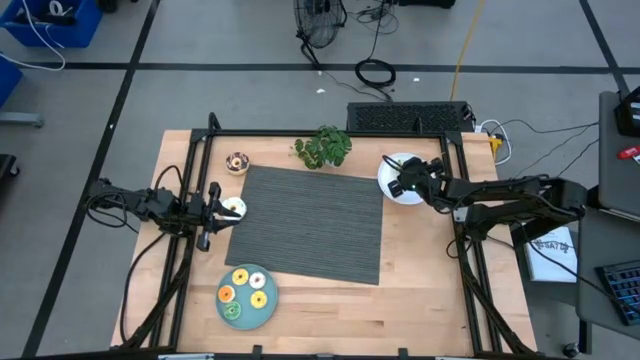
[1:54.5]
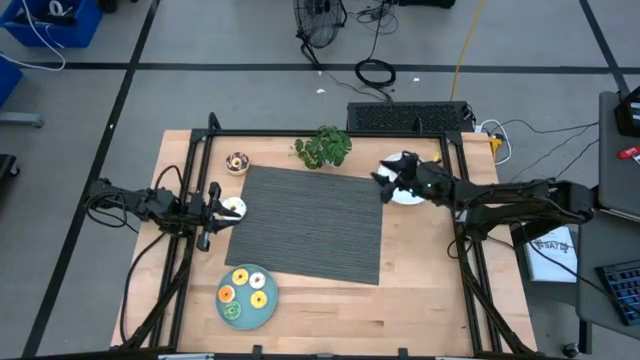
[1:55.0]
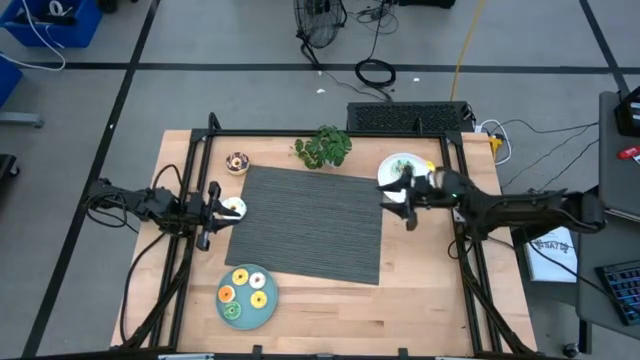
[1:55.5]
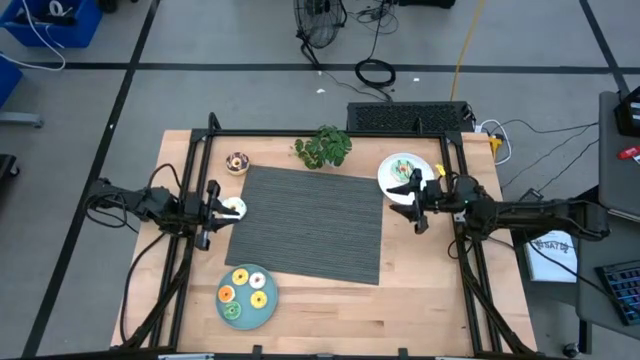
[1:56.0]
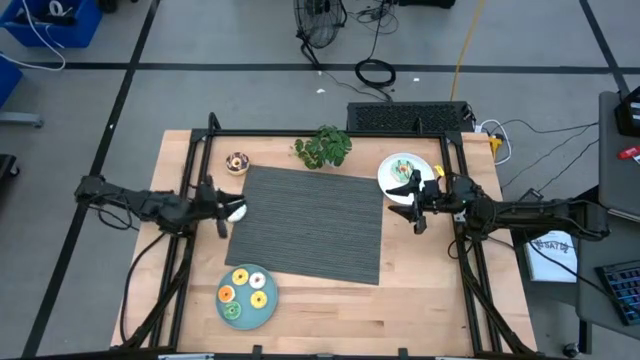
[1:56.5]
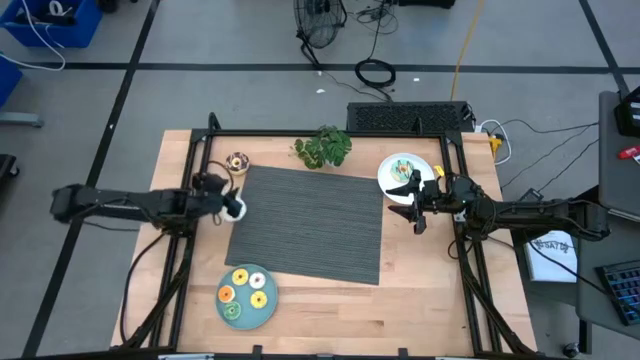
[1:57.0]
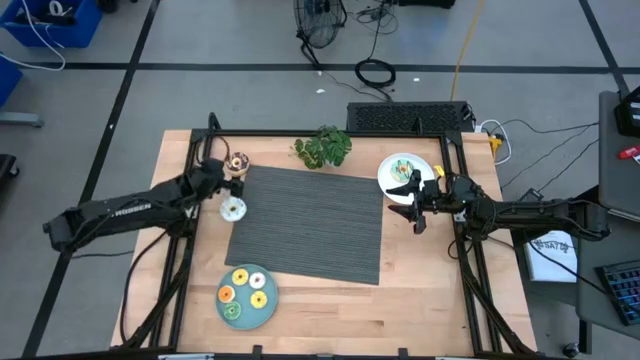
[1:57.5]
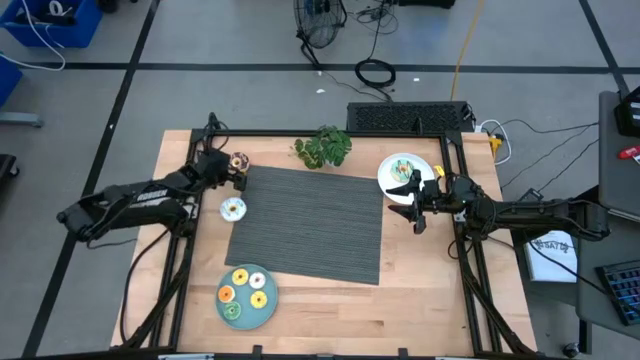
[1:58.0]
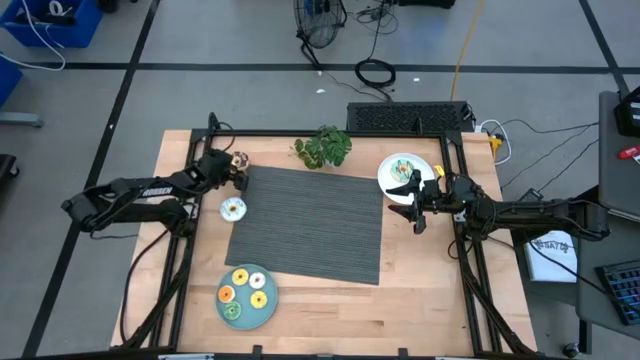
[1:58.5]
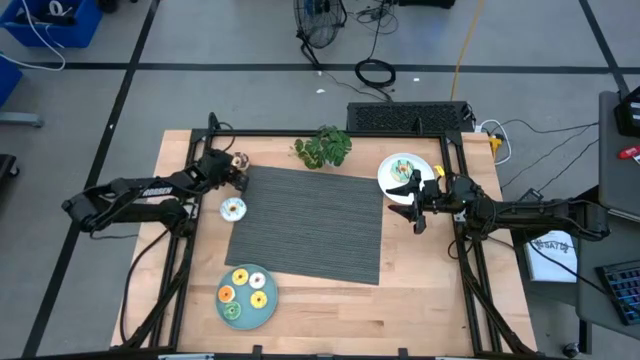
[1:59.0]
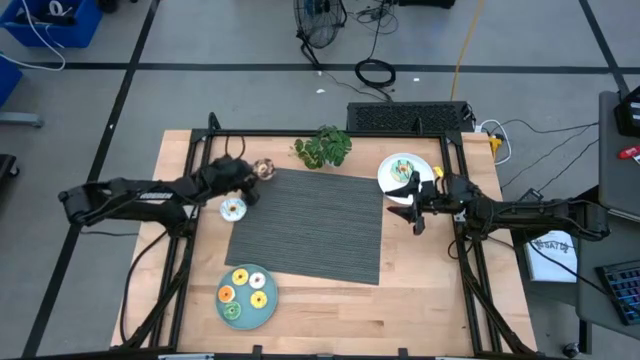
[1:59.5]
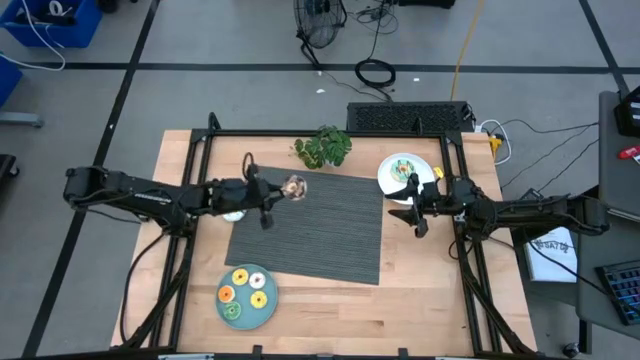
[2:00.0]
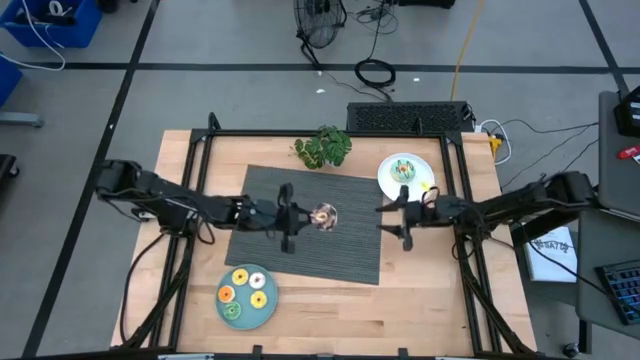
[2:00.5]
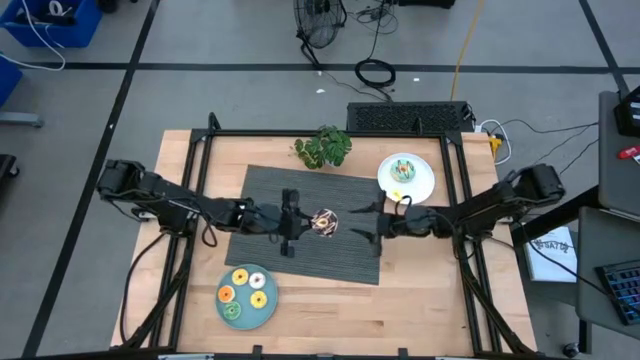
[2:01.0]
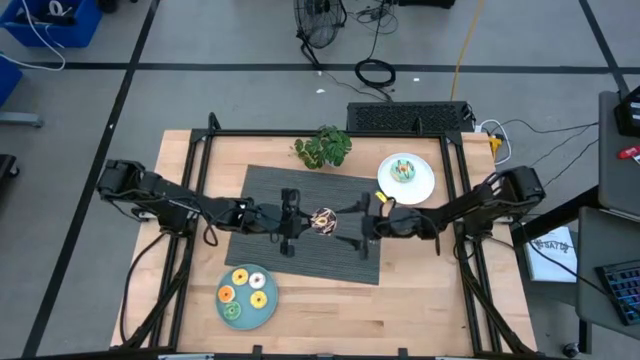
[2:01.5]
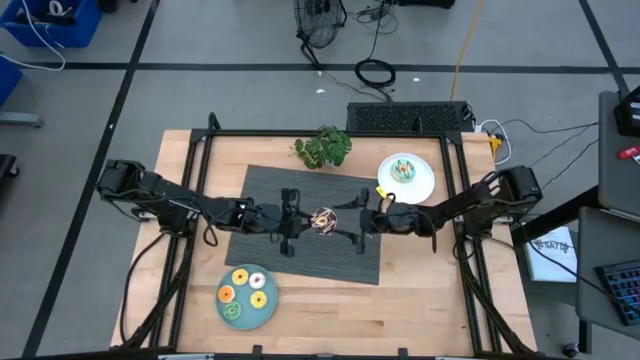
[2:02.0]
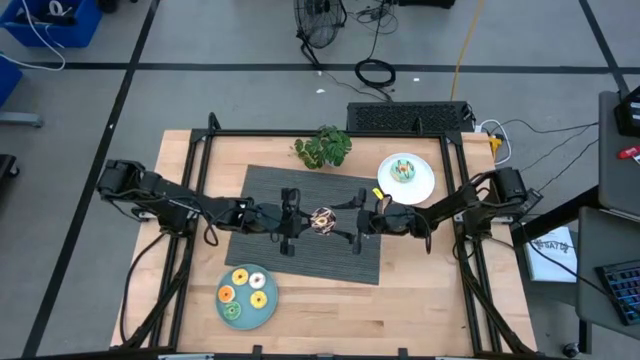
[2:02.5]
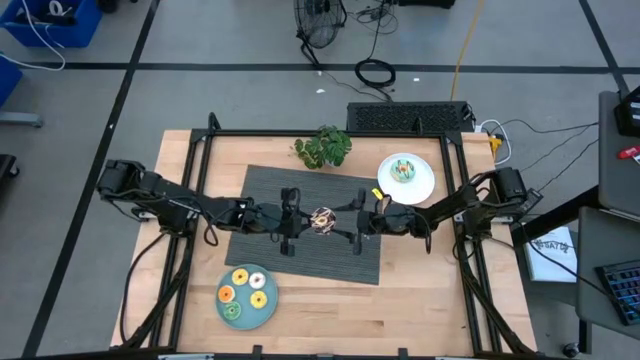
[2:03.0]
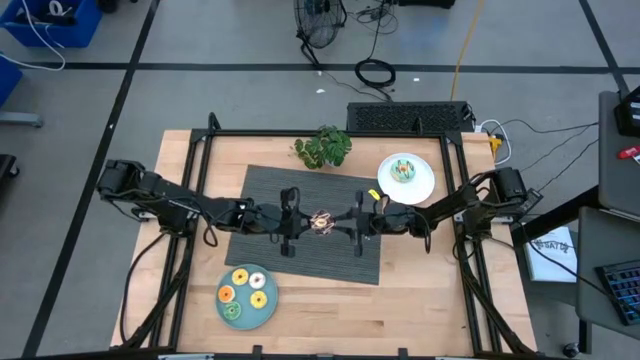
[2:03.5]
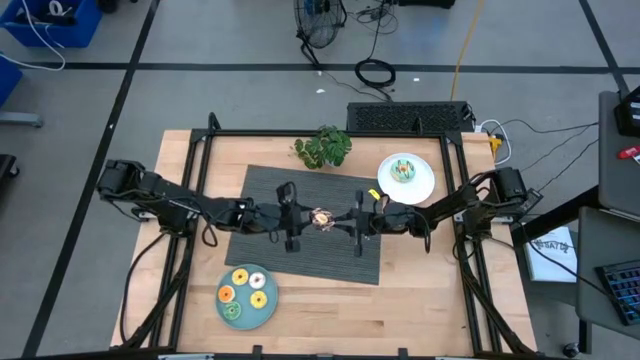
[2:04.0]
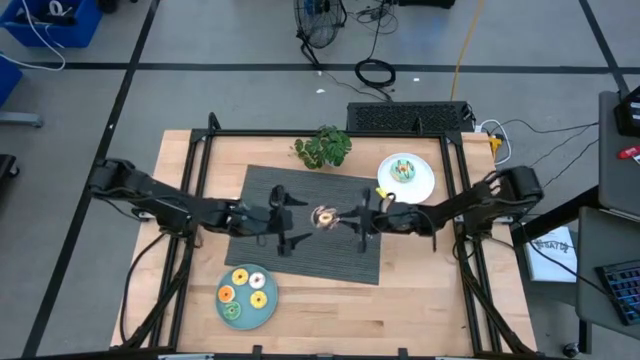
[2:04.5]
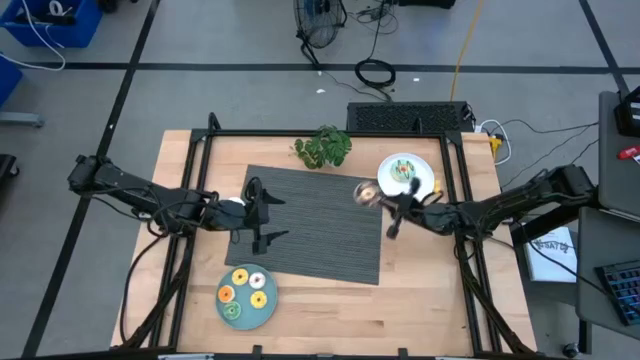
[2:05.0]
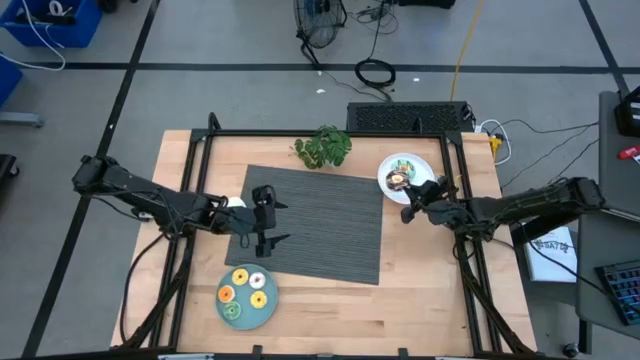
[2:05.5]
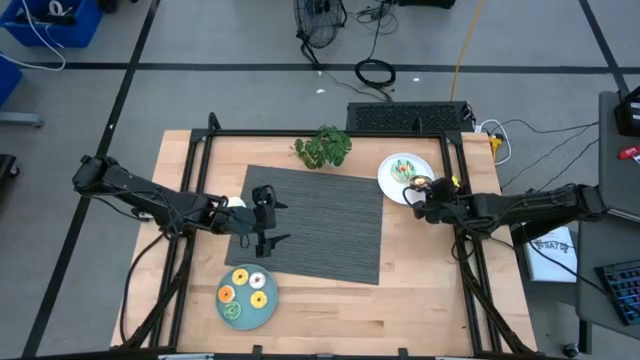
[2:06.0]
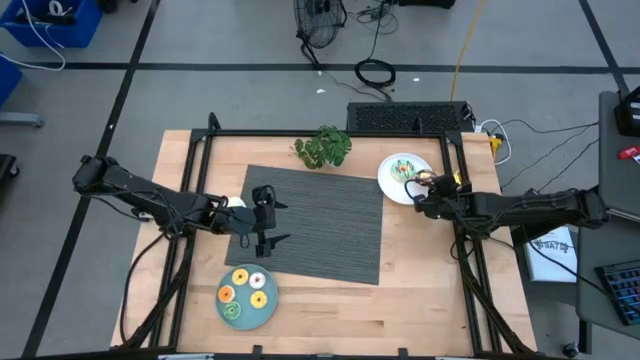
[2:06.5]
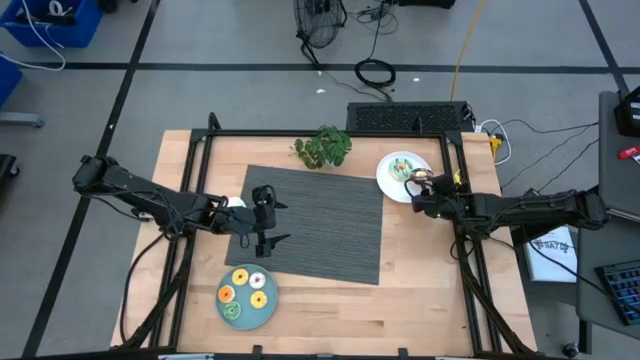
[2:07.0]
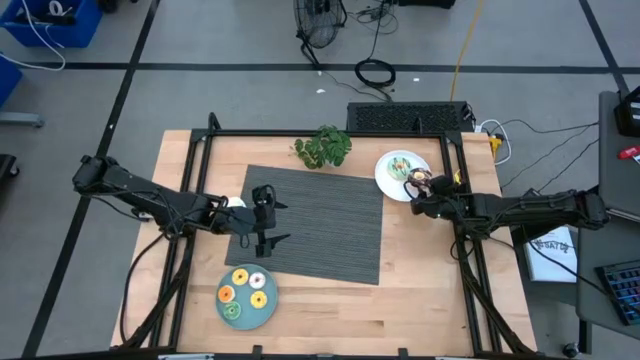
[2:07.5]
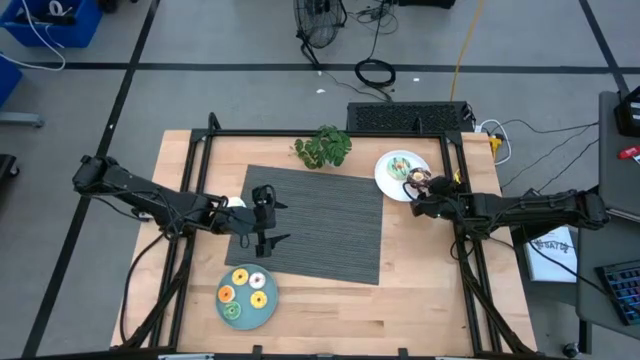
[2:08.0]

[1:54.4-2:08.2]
Task: Pick & Place donuts
Put the big black donut on the white plate

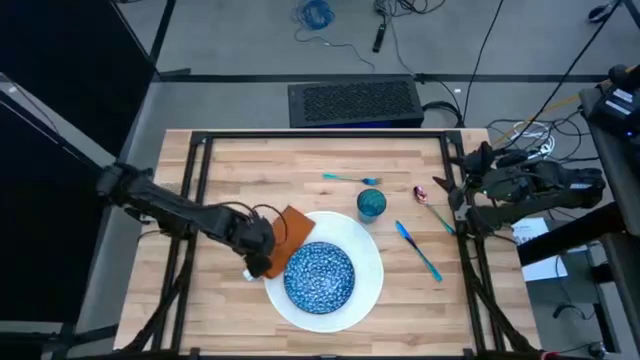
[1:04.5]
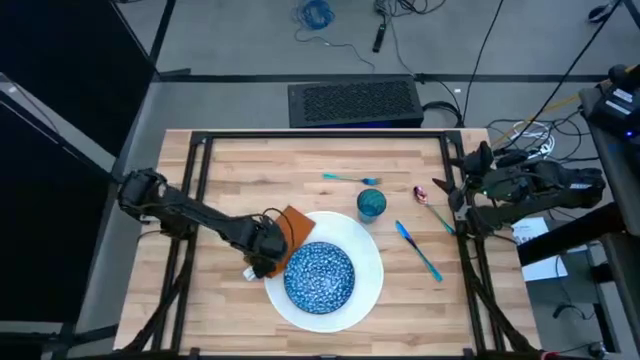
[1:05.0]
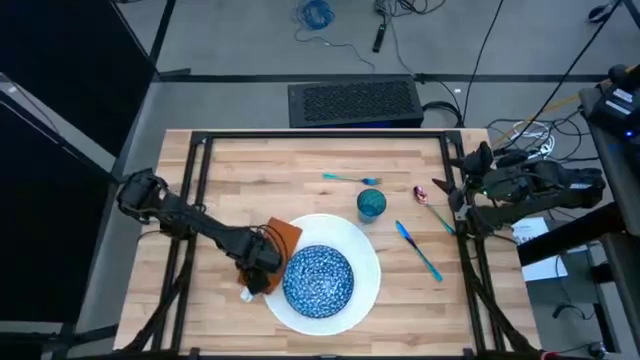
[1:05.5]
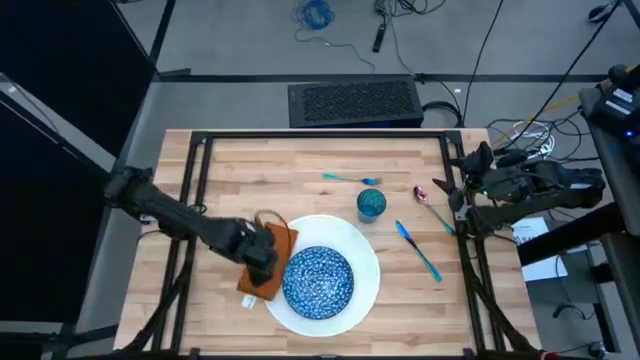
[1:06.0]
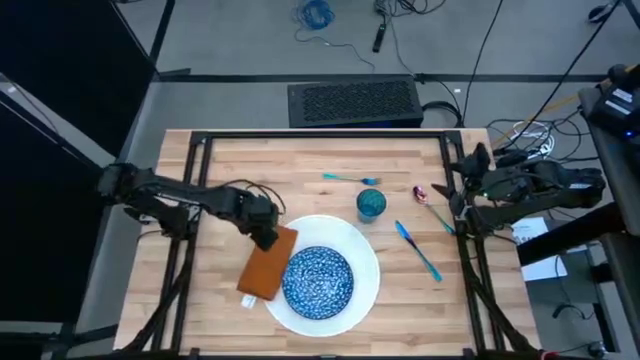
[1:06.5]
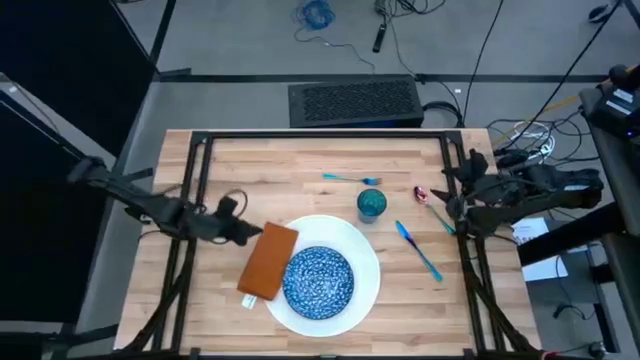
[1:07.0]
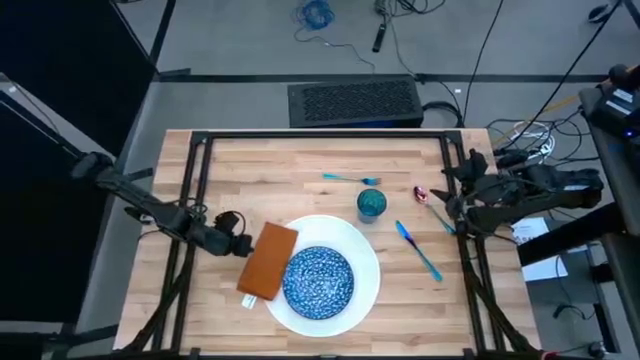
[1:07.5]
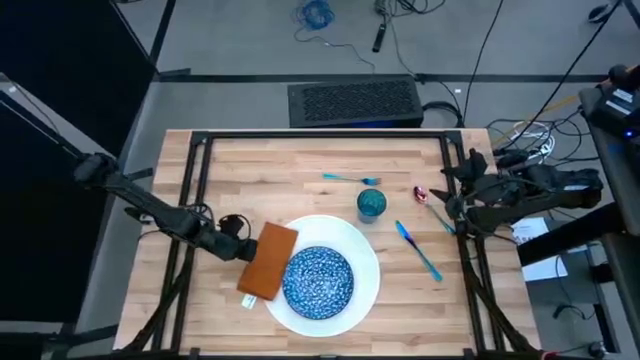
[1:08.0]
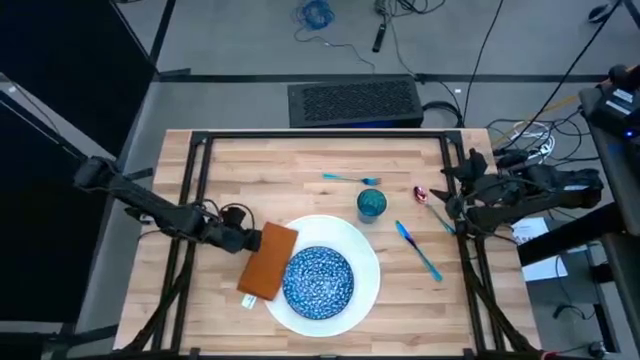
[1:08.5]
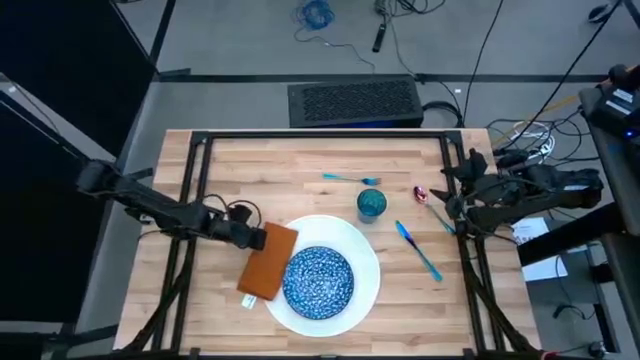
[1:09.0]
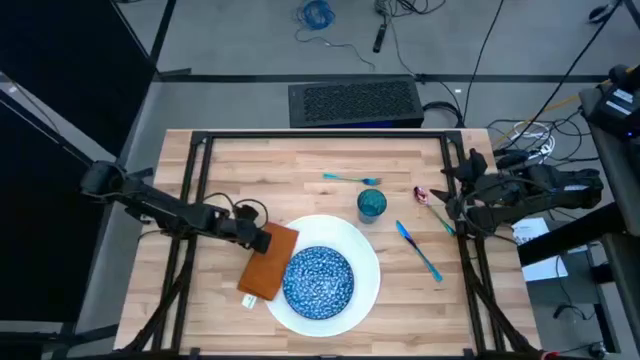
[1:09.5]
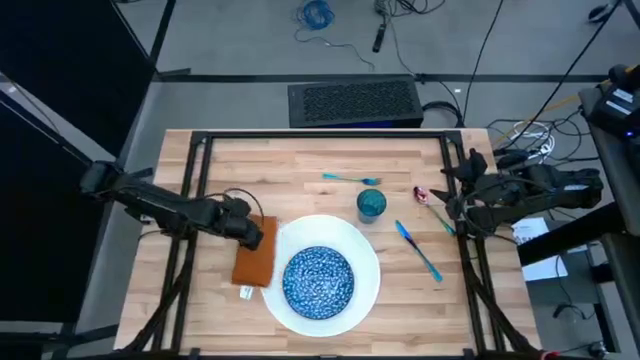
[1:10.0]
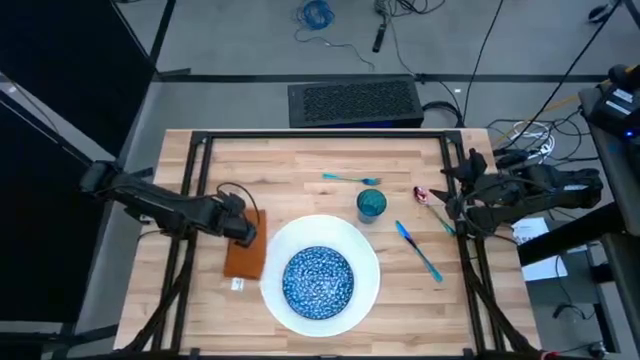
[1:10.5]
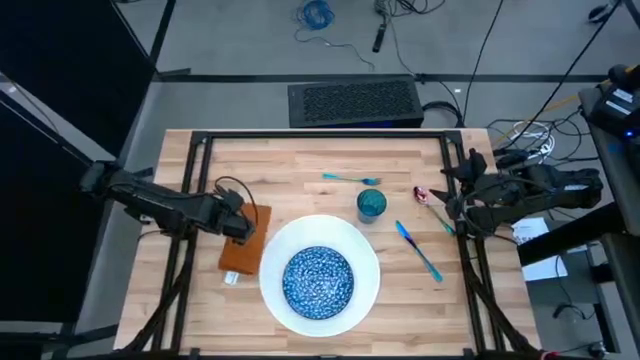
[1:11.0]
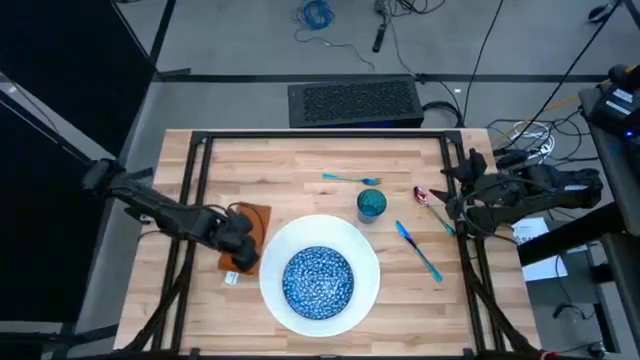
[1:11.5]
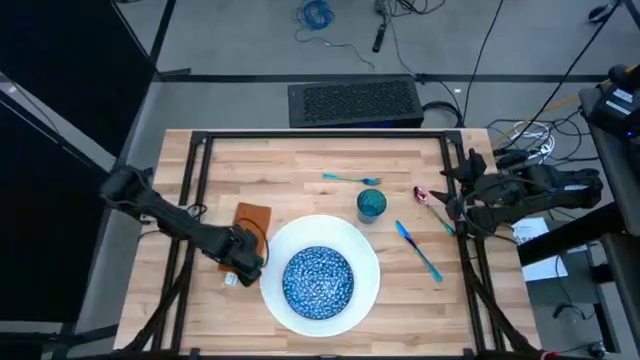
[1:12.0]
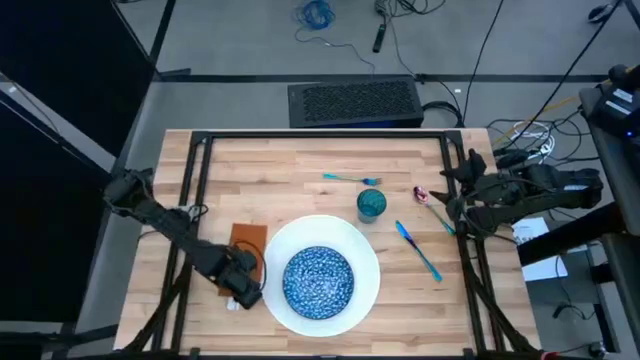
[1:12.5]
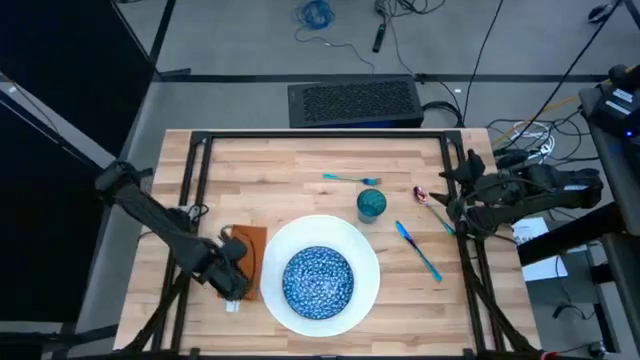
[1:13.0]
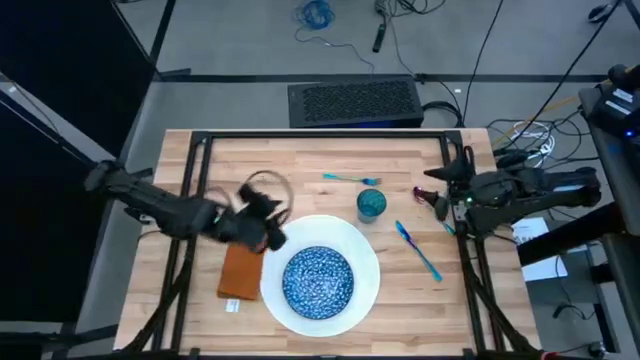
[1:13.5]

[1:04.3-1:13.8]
Task: Set table place
Put the brown table napkin to the left of the white tablemat
